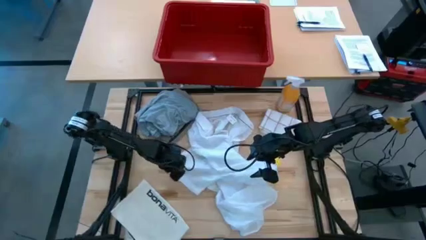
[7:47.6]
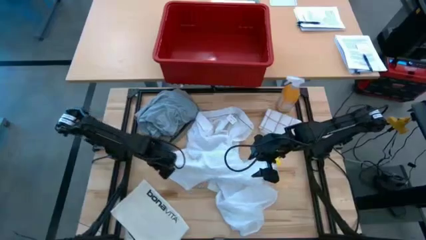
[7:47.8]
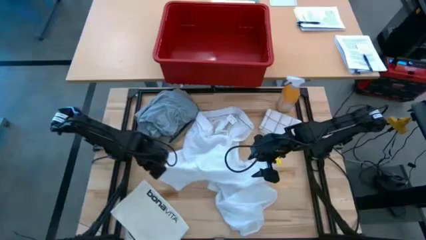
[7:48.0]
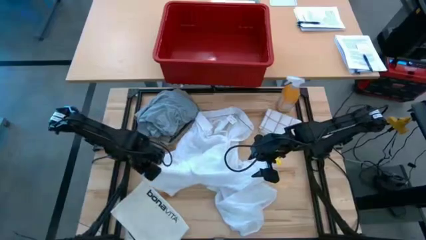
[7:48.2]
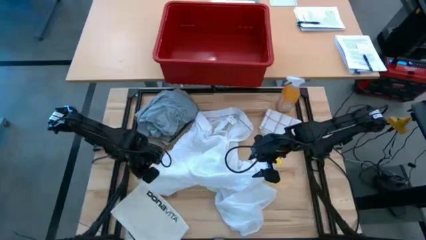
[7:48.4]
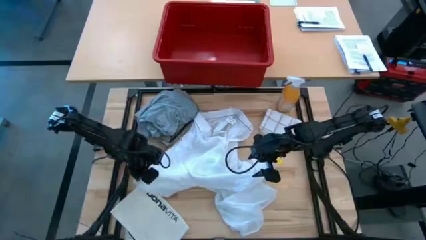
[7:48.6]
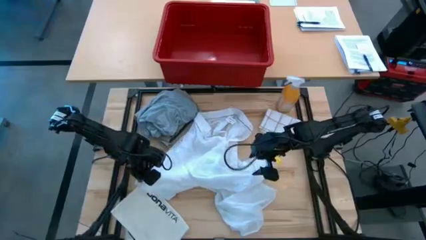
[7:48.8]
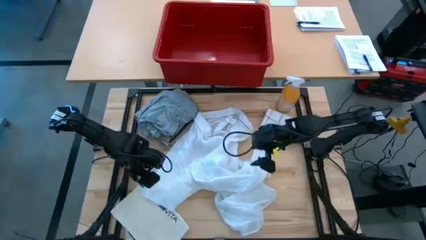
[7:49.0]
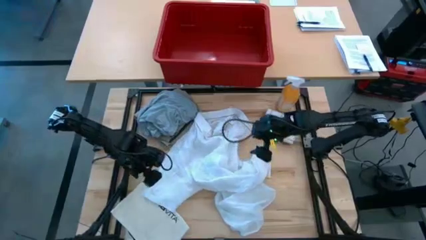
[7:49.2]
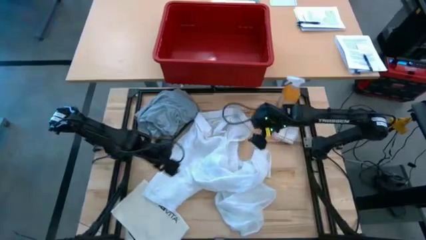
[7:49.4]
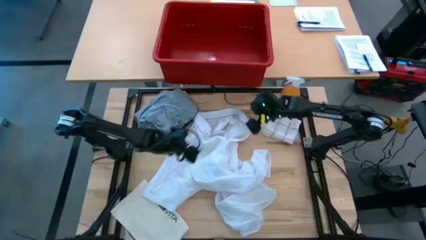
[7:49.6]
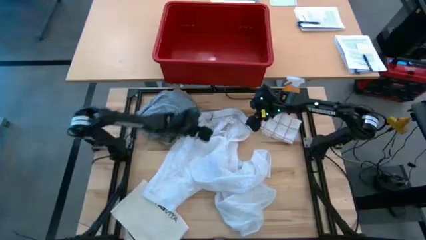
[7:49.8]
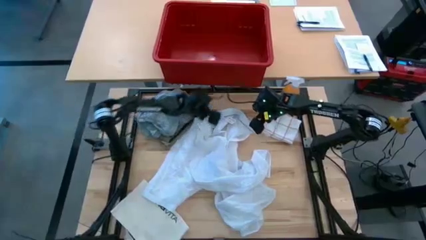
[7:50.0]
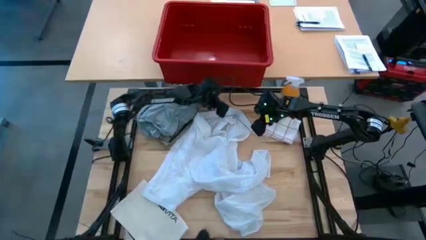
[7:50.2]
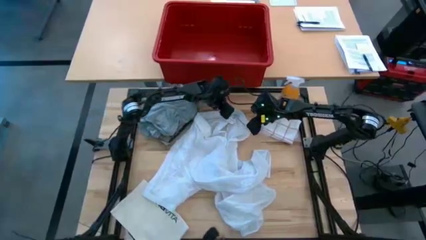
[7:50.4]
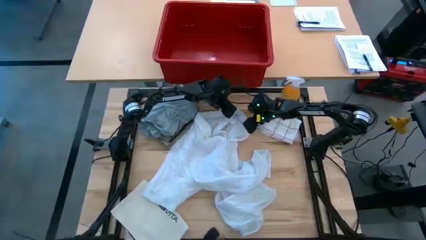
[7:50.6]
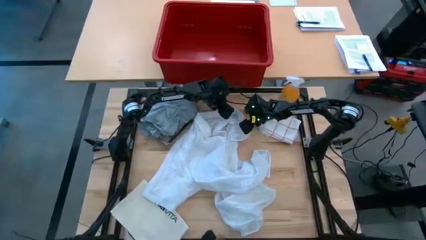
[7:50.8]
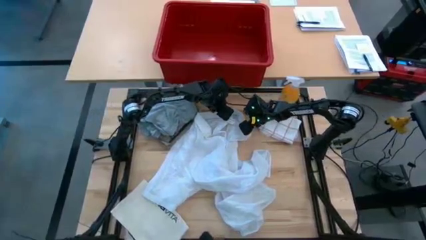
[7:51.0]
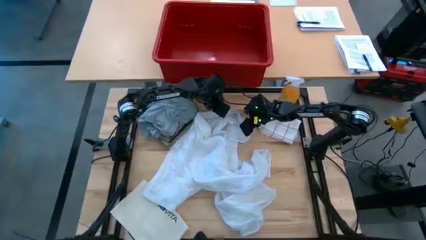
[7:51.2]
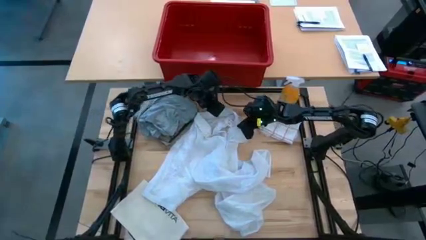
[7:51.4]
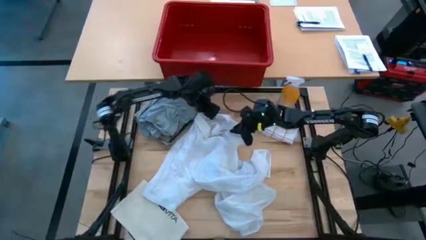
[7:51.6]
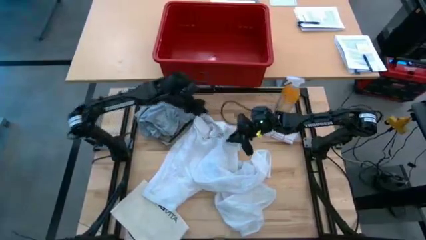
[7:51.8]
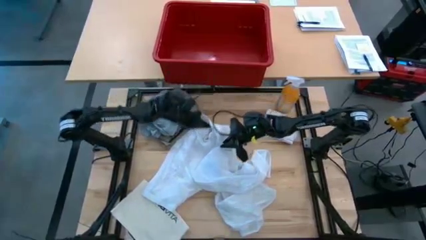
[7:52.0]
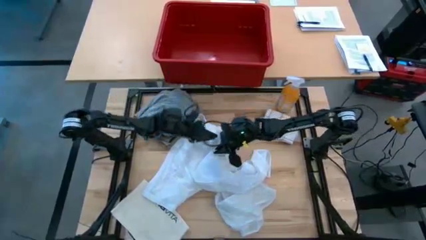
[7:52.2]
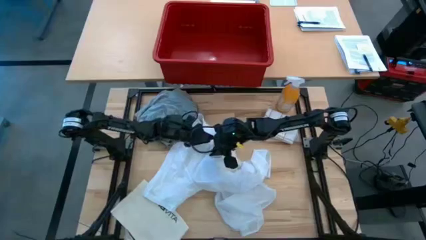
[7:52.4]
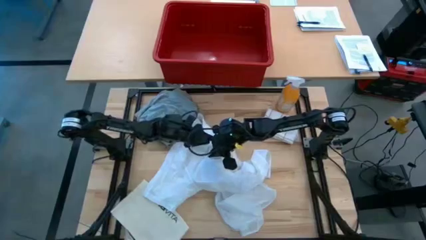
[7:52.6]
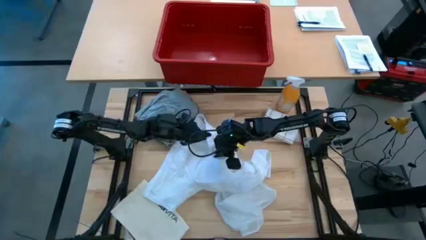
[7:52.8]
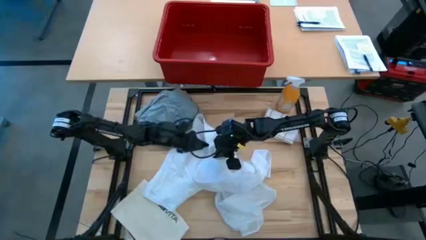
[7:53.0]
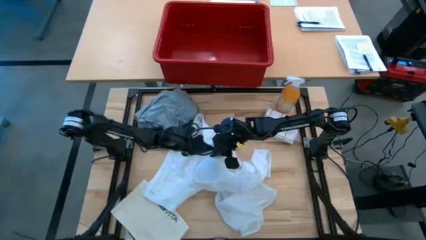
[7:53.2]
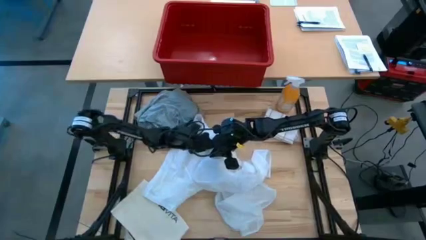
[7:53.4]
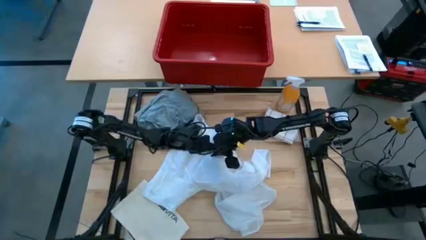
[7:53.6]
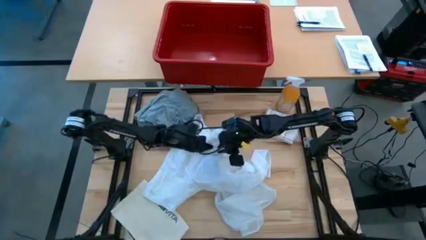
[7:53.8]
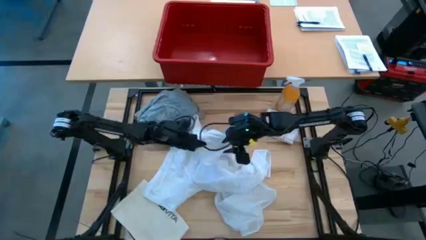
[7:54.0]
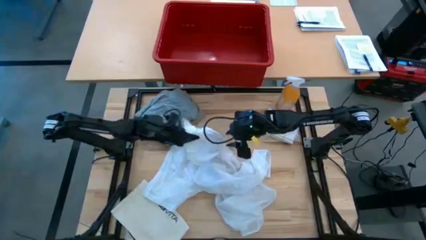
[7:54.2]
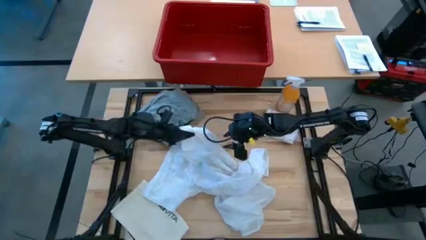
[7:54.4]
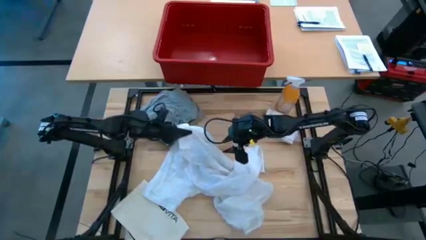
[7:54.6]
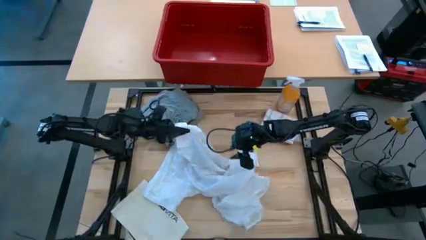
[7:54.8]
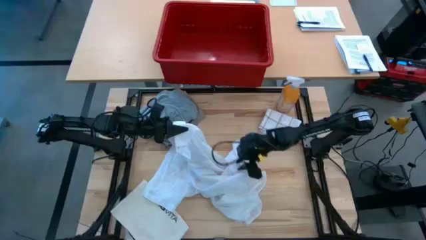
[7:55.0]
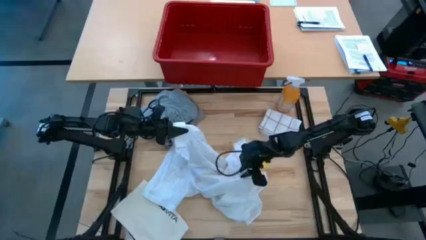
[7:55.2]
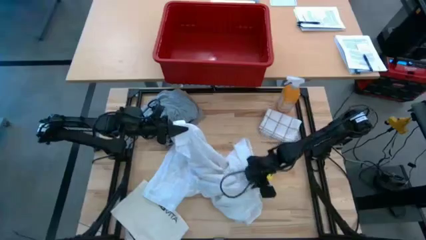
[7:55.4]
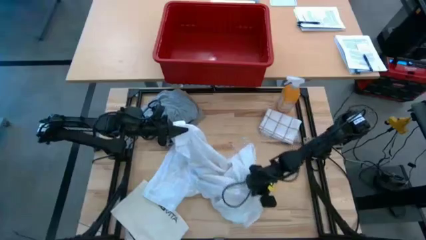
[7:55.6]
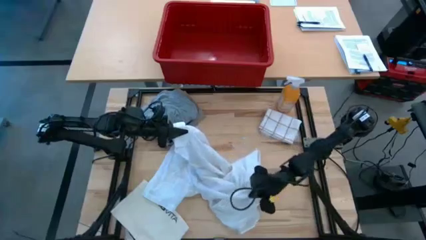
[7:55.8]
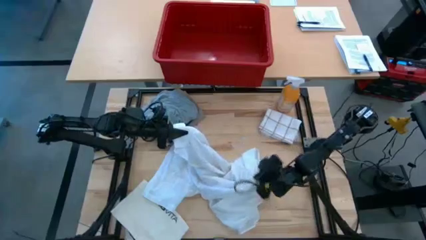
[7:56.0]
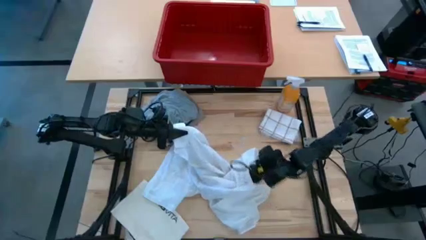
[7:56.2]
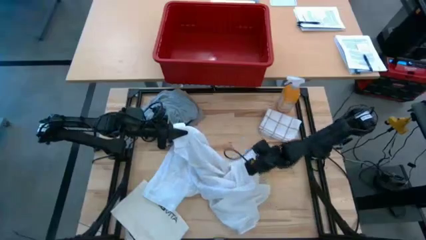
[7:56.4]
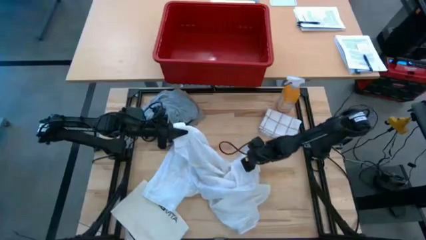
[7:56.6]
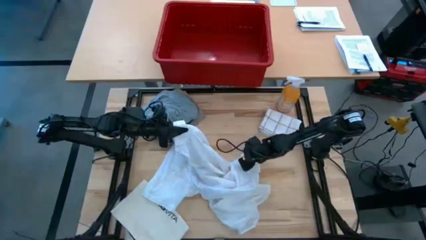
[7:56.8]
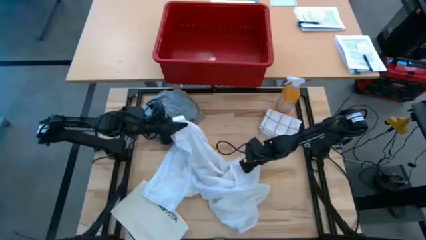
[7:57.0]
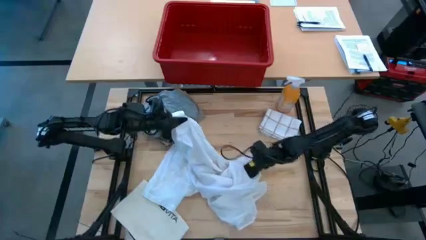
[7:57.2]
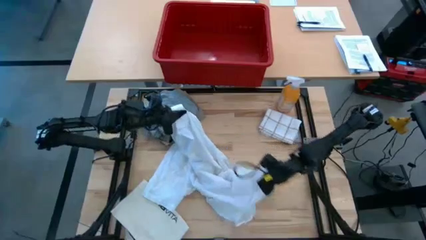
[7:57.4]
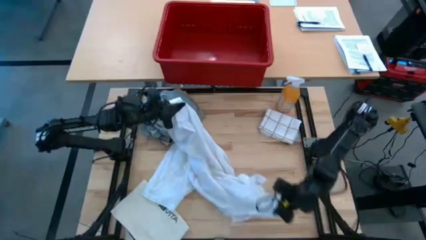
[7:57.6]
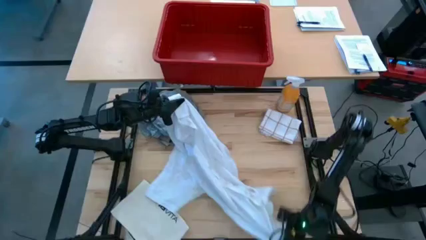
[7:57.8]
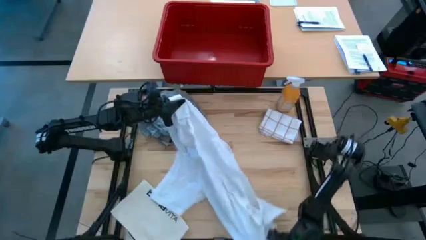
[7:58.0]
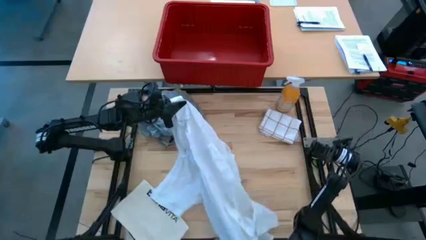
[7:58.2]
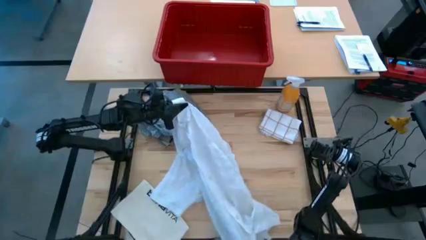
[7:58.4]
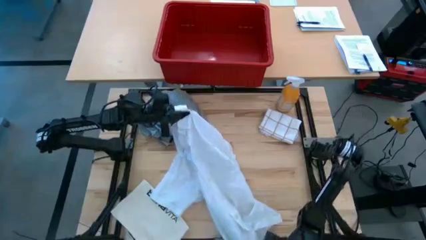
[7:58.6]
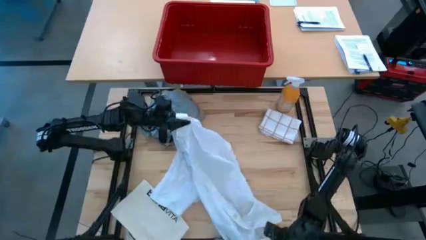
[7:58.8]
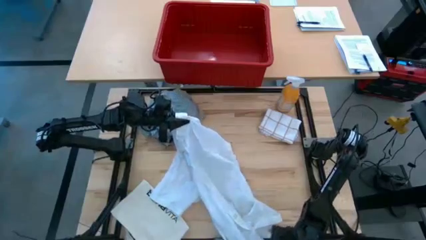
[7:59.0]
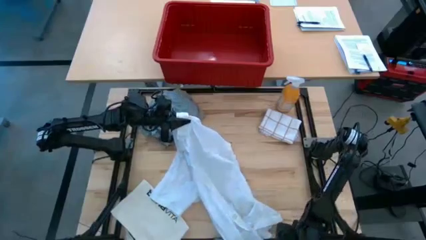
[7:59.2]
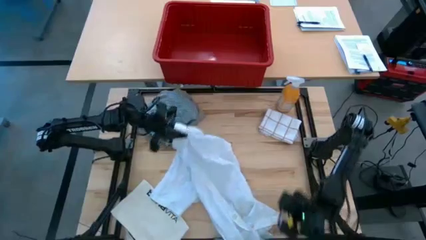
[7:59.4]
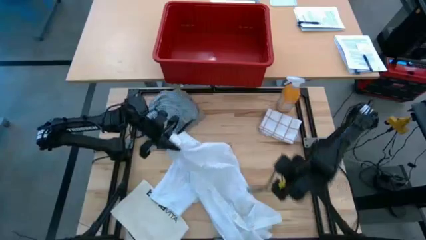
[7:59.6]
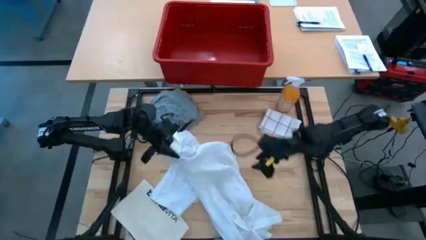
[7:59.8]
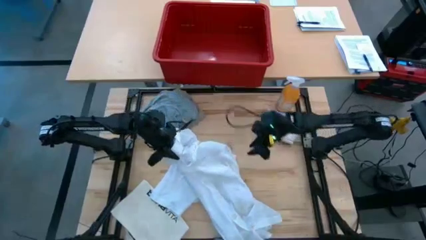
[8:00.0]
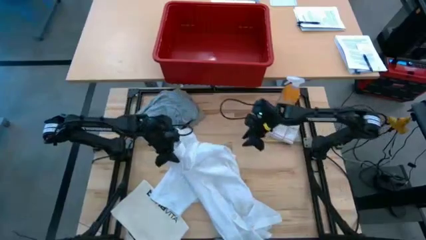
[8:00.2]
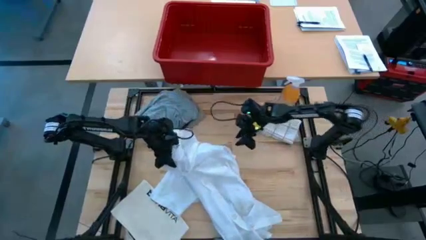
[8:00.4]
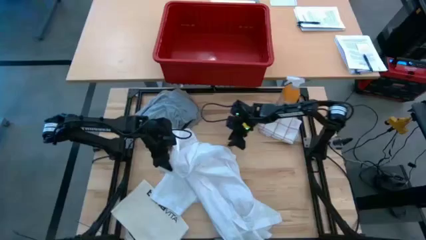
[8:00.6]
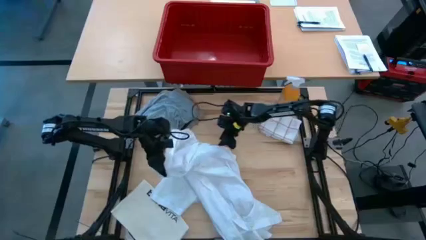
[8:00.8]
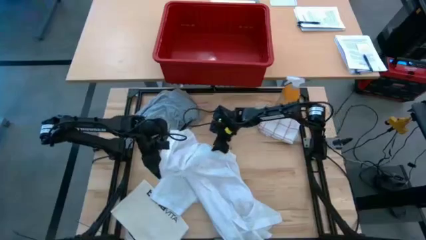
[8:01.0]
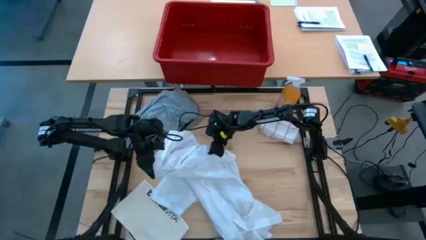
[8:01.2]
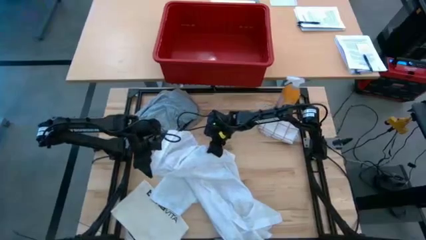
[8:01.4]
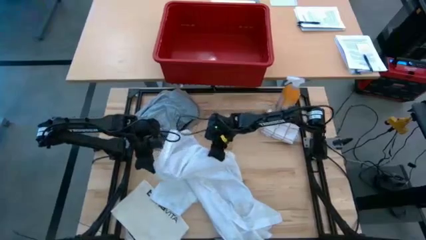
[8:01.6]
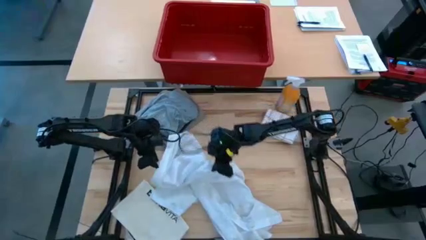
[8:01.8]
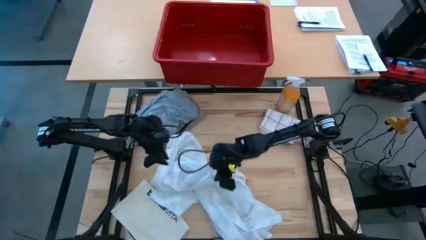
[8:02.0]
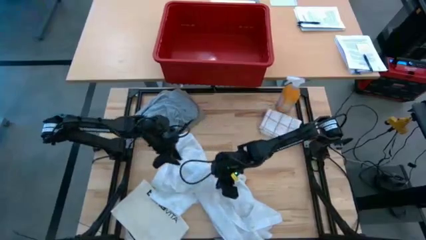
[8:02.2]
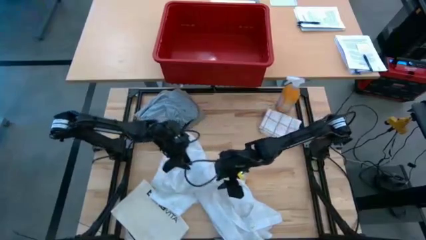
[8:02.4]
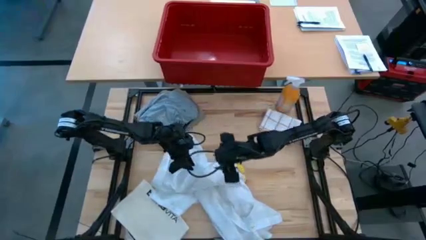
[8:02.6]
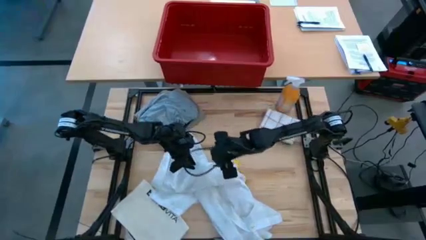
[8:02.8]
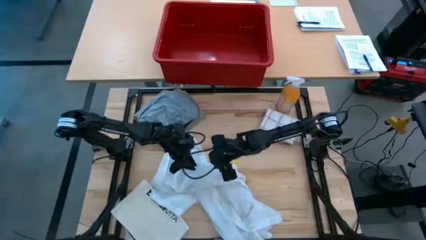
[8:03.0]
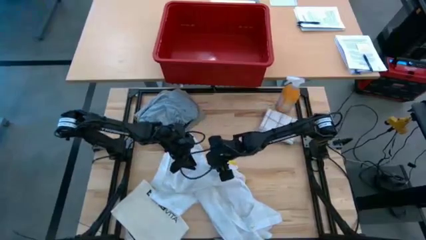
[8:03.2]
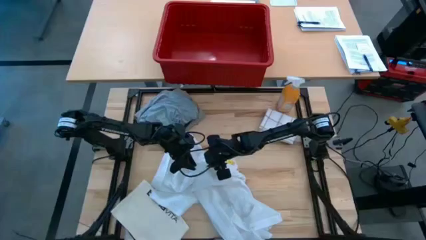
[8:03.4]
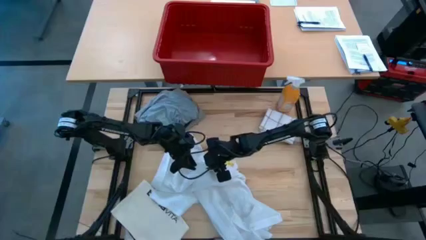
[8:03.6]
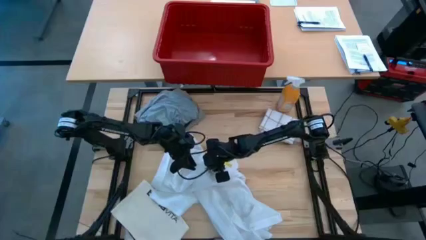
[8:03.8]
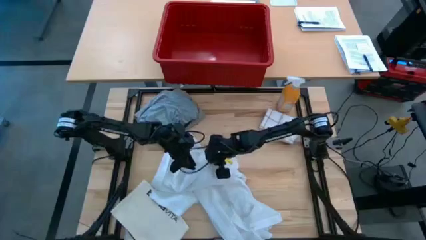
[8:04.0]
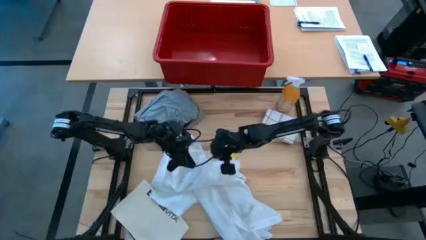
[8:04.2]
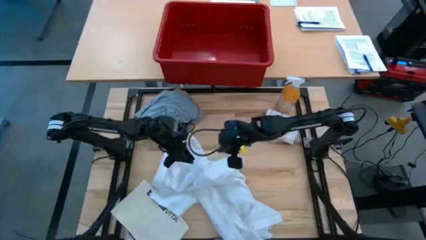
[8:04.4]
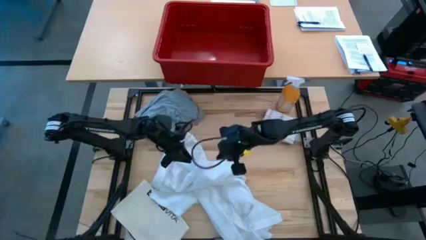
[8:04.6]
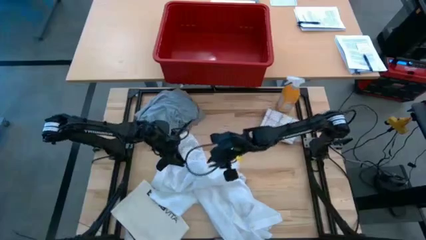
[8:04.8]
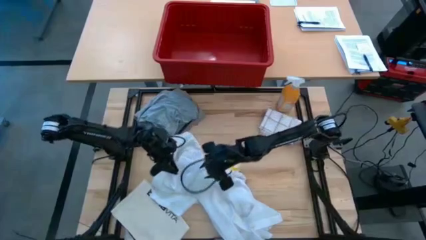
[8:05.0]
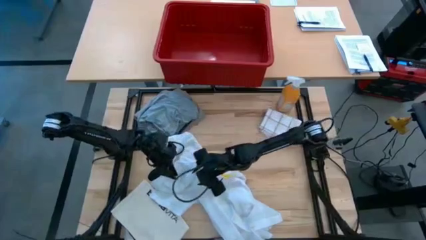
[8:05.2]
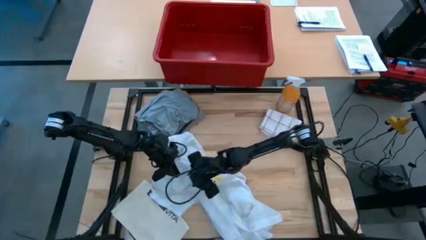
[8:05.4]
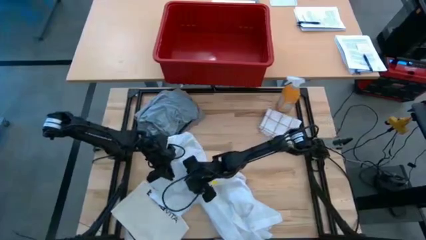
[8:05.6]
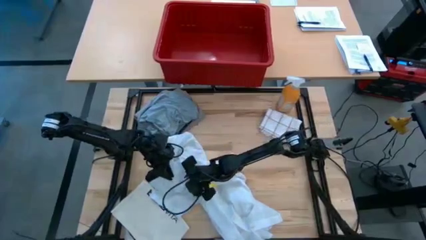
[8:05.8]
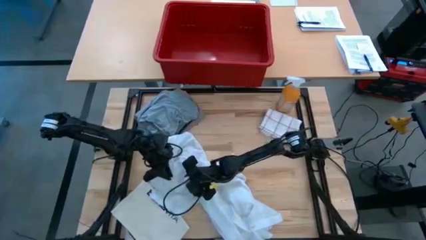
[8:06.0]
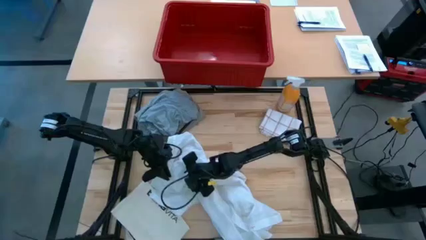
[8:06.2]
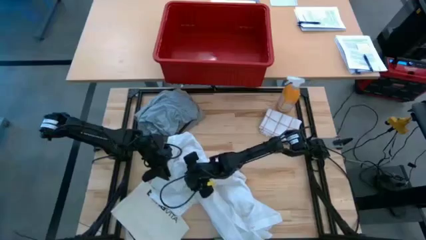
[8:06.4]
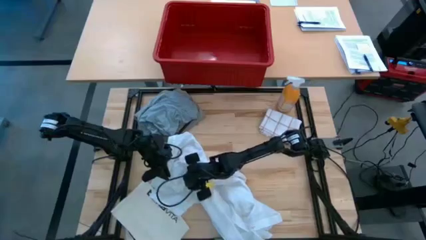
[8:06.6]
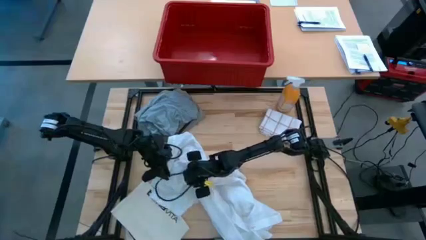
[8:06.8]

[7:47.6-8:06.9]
Task: Fold laundry
Fold the white long sleeve shirt
